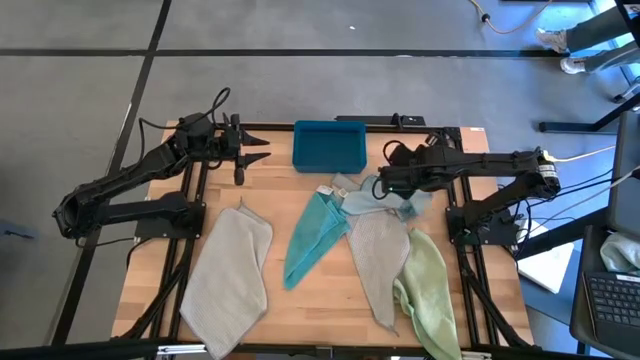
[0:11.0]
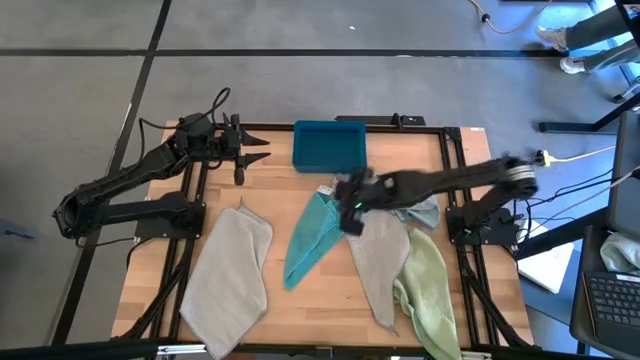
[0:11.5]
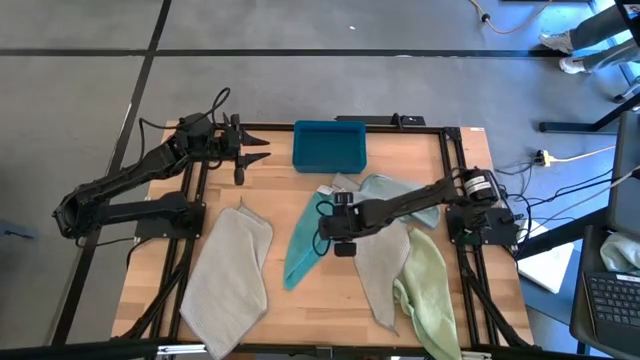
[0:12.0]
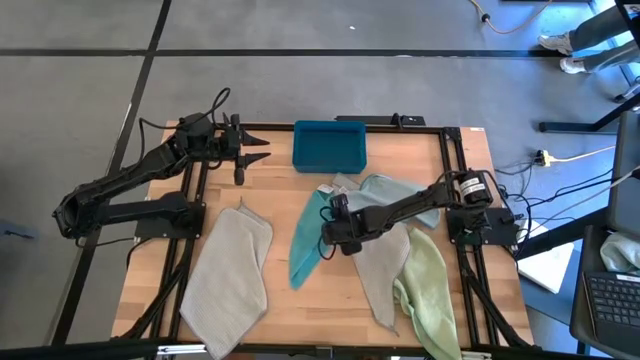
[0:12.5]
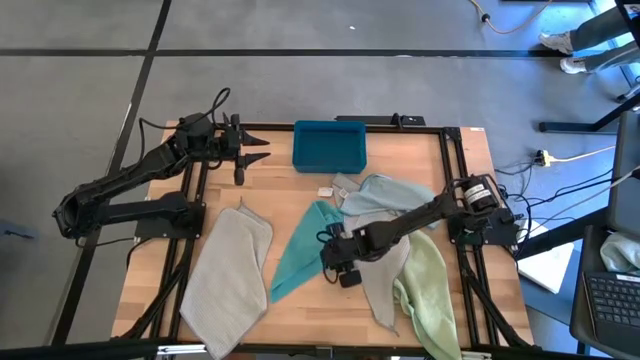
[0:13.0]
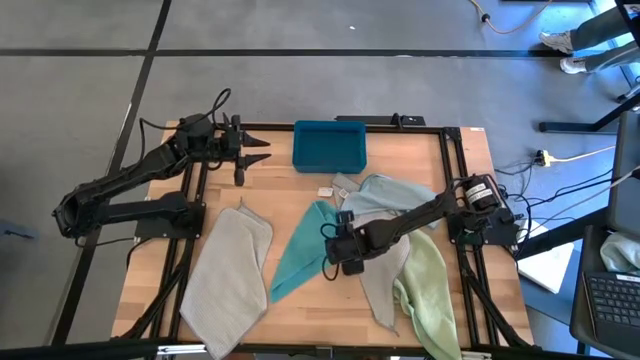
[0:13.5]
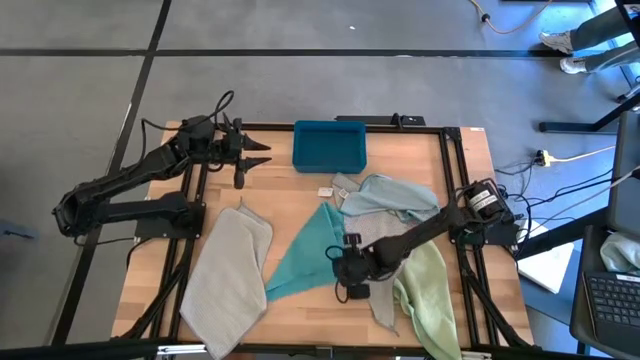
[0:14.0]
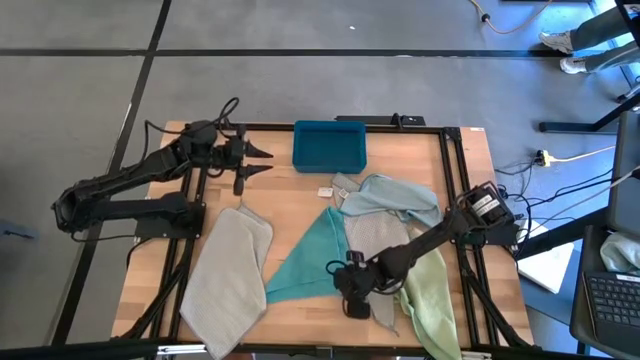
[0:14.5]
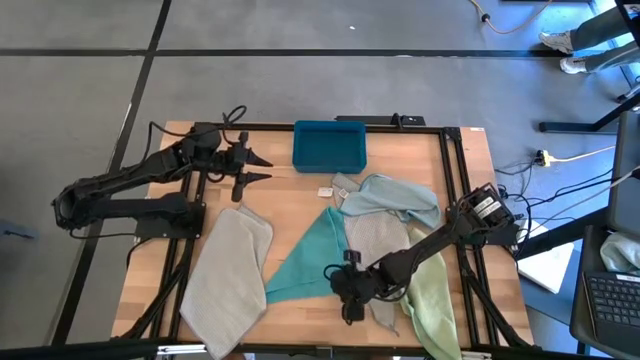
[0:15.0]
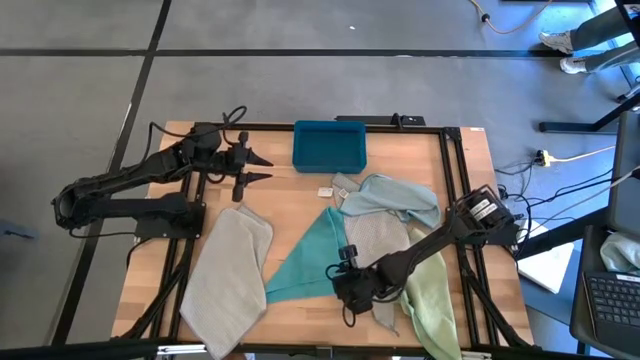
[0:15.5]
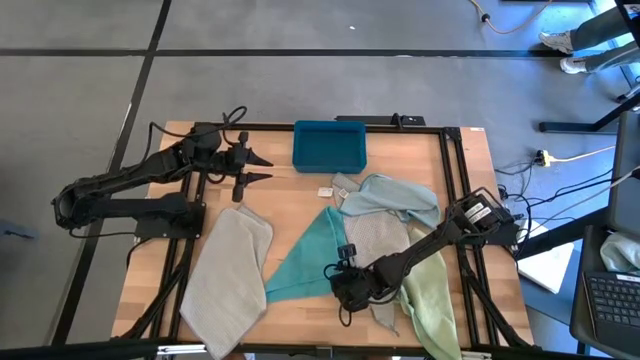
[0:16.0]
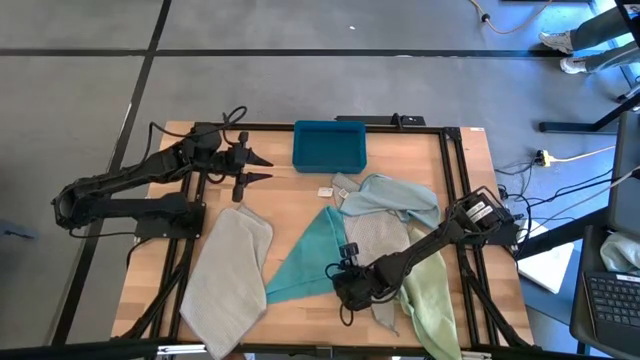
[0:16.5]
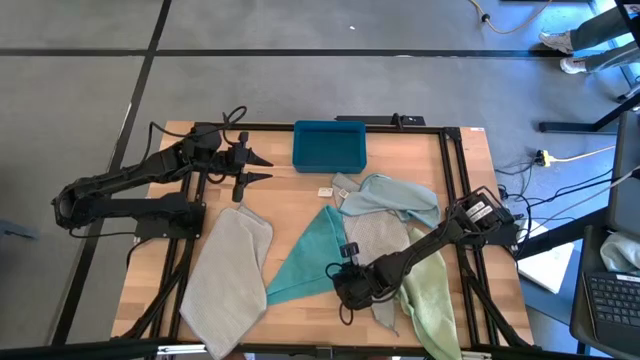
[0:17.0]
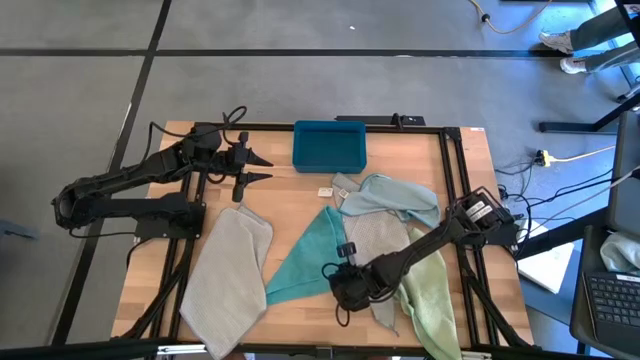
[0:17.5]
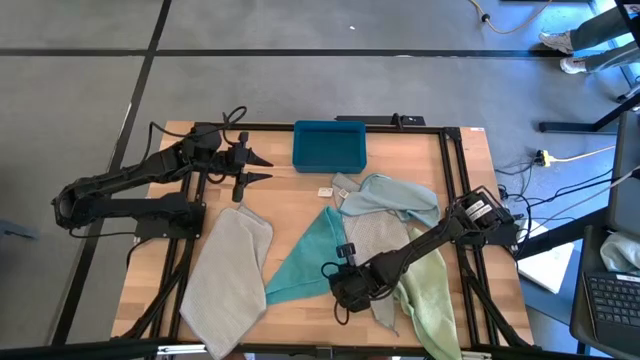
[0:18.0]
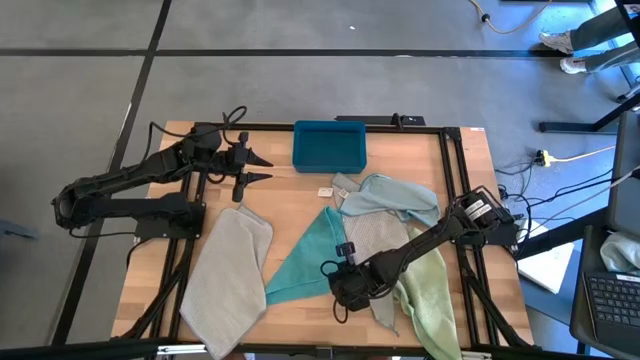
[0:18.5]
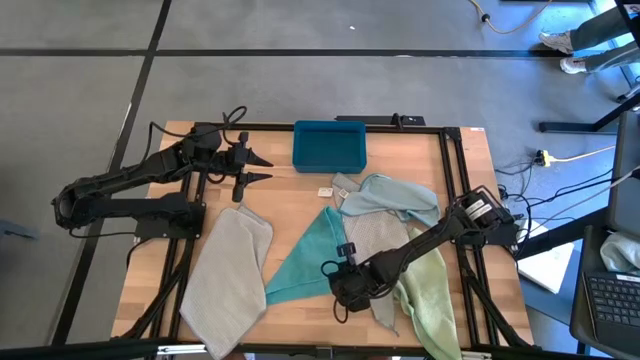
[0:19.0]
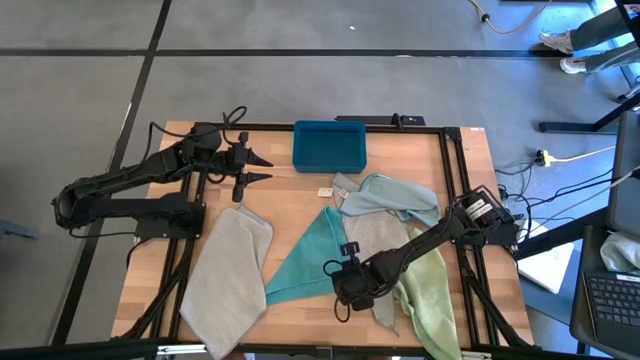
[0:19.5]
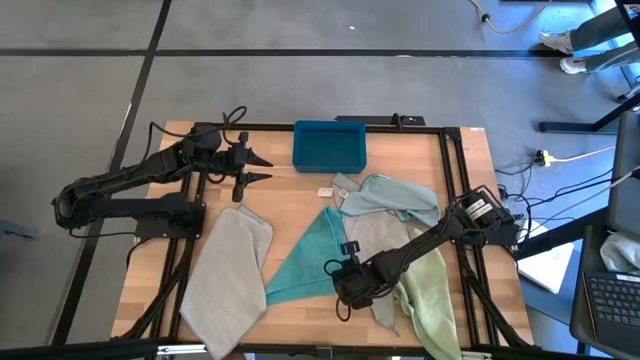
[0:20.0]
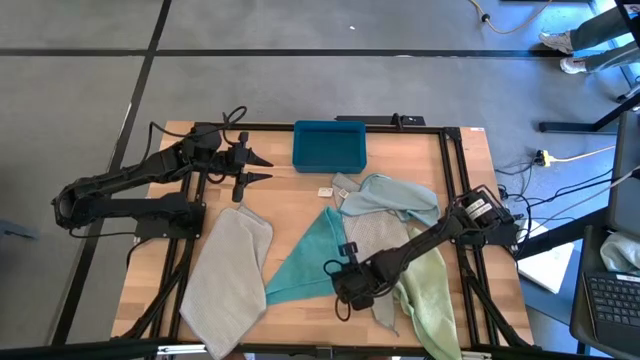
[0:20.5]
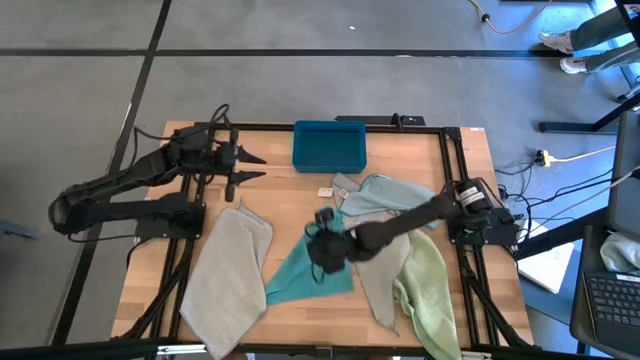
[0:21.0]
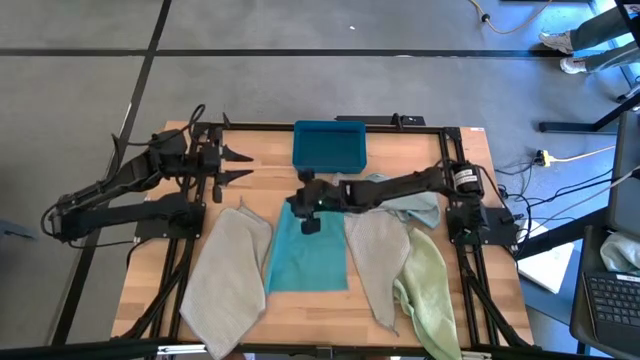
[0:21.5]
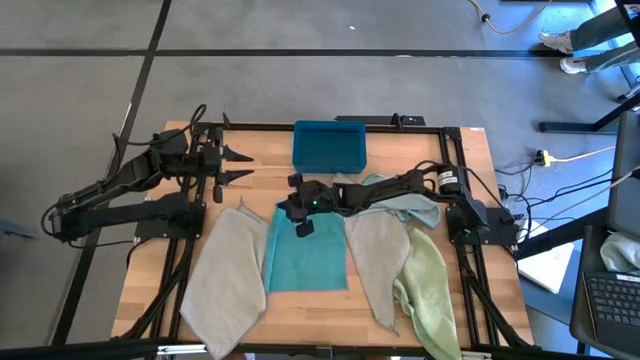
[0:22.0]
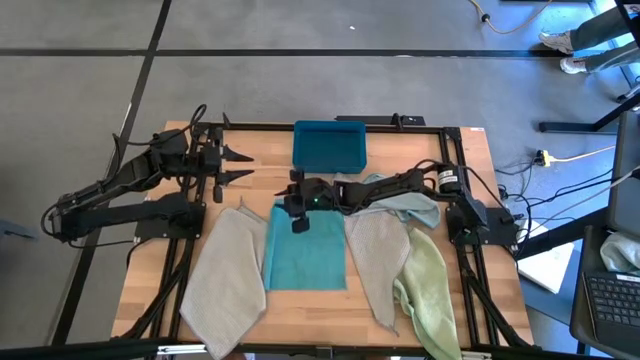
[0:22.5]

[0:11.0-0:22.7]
Task: Fold microfiber towels
Adjust the dark blue towel

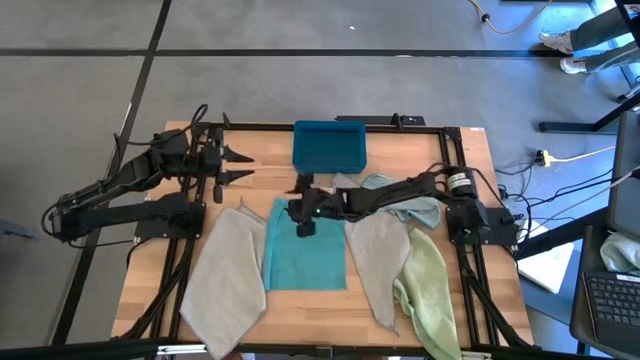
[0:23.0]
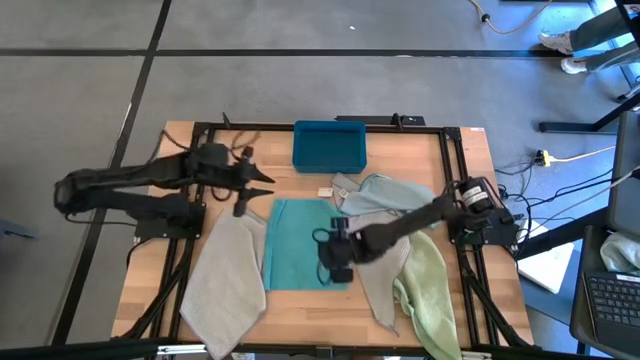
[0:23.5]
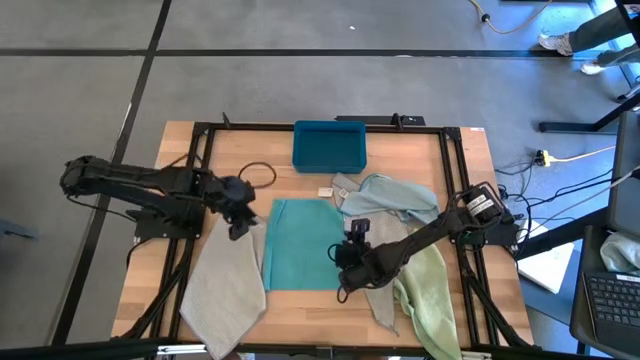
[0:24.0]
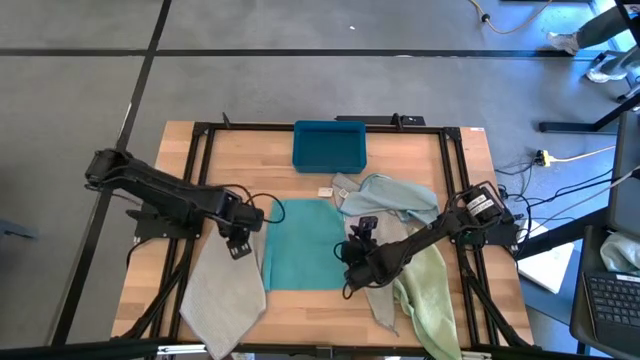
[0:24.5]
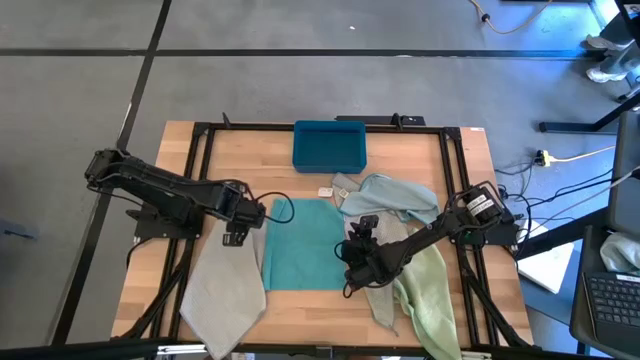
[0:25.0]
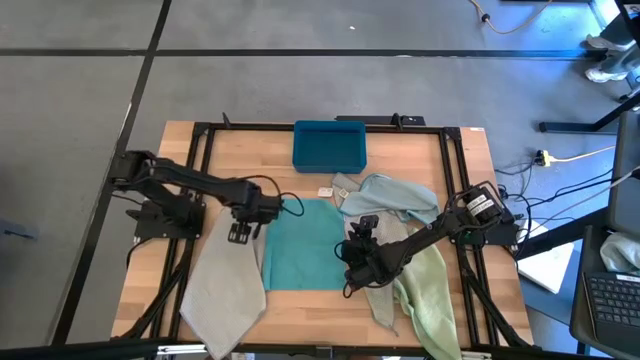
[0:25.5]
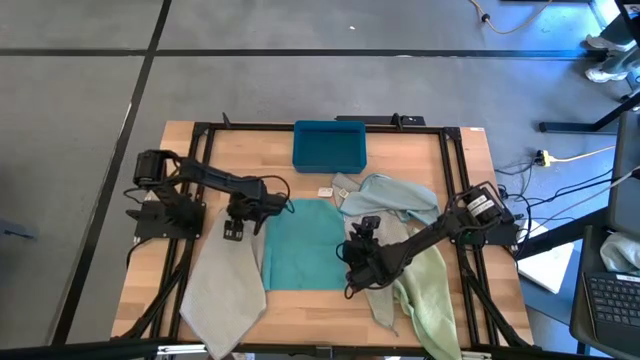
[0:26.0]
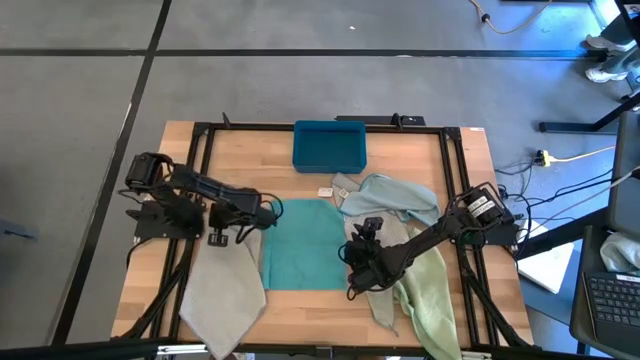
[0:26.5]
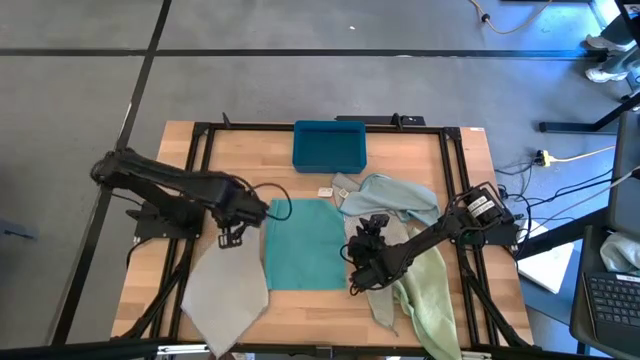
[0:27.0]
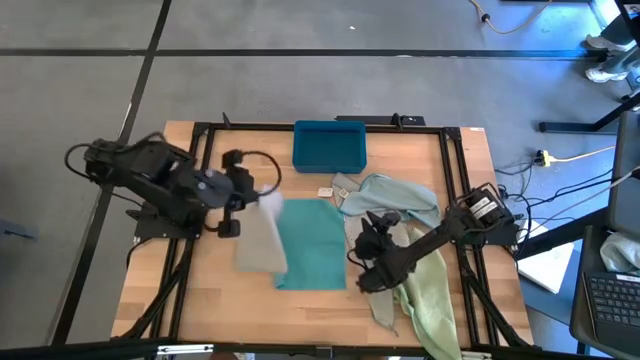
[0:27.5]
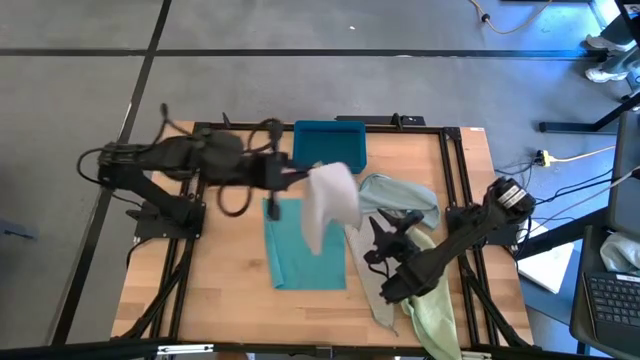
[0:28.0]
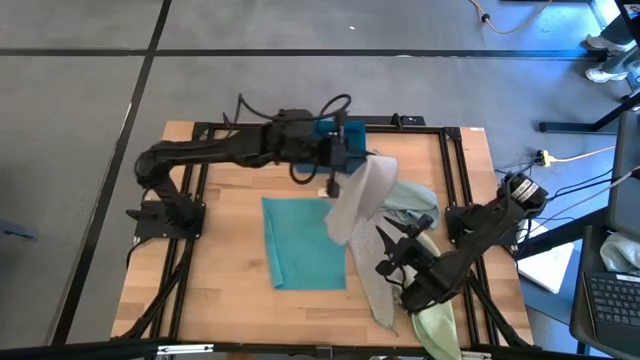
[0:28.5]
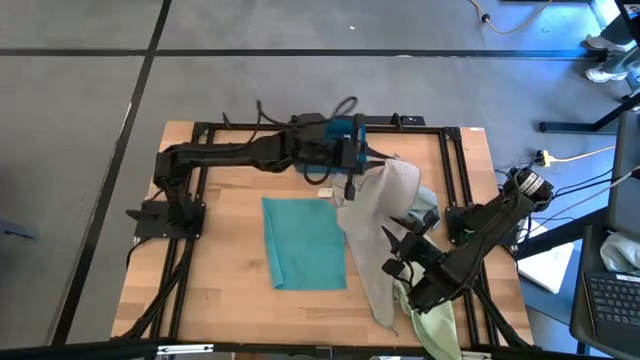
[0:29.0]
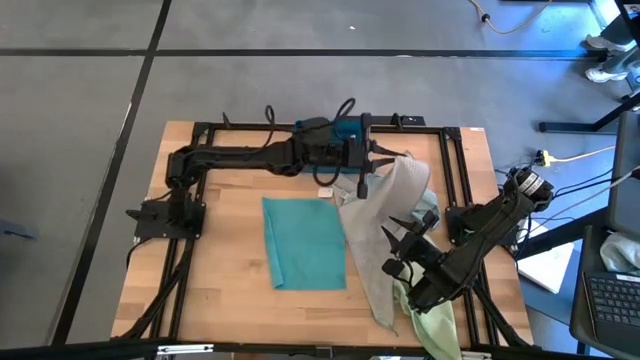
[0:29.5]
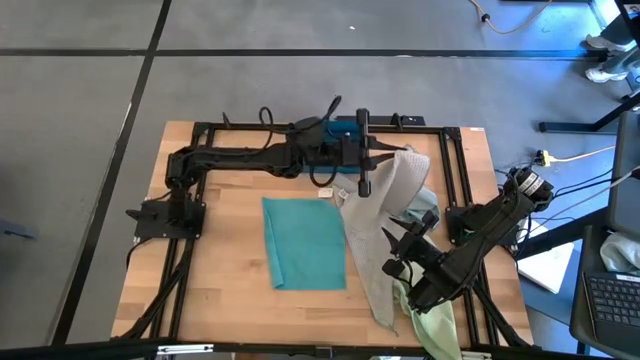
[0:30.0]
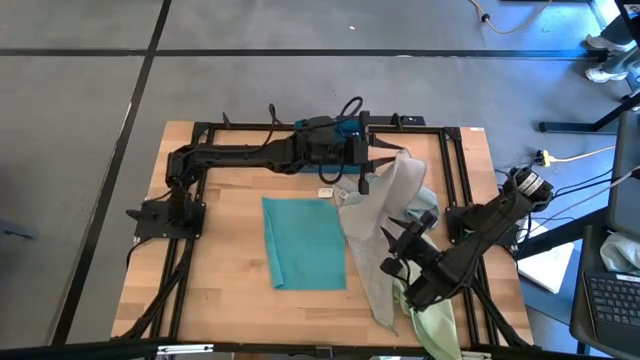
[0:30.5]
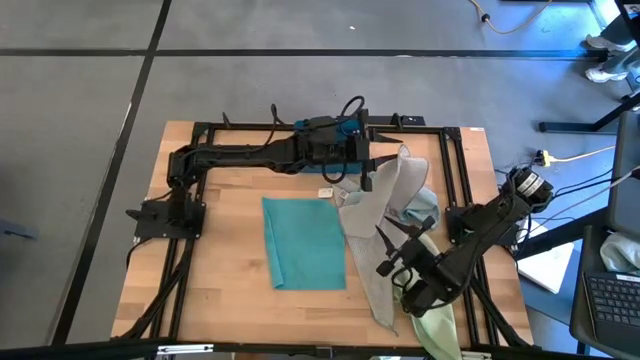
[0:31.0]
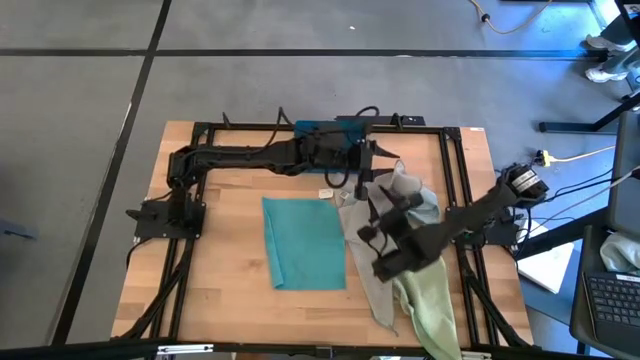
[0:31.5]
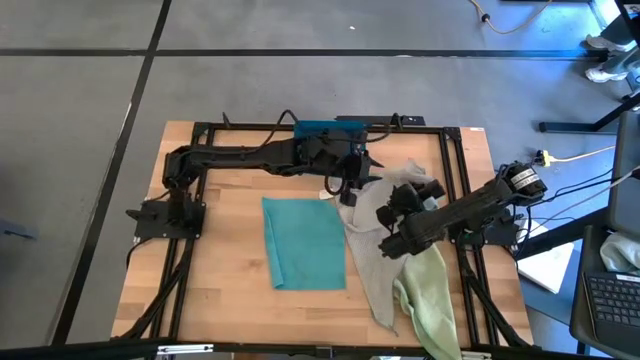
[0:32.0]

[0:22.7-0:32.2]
Move the left gray towel to the top right of the table
